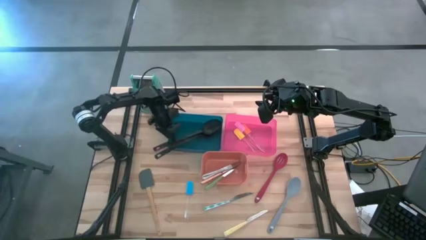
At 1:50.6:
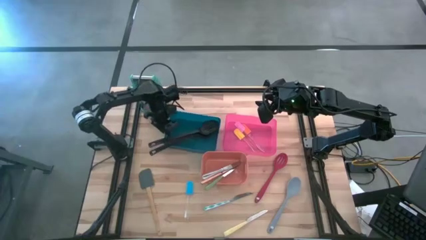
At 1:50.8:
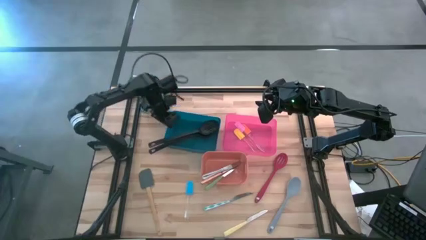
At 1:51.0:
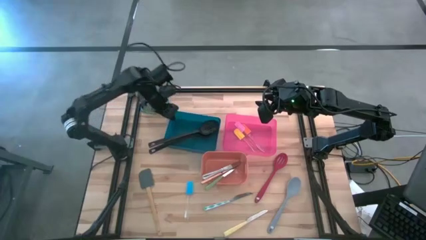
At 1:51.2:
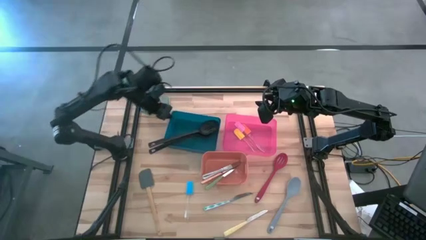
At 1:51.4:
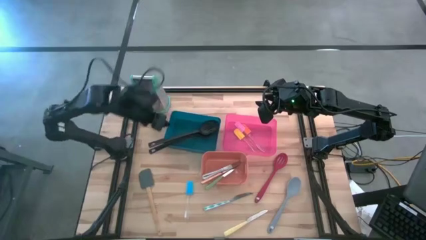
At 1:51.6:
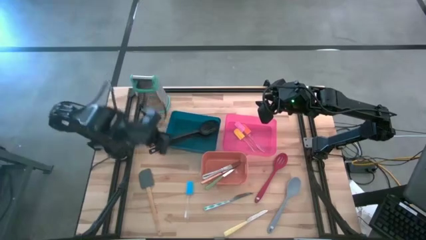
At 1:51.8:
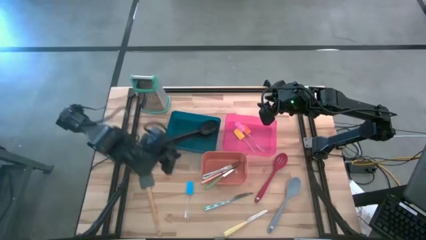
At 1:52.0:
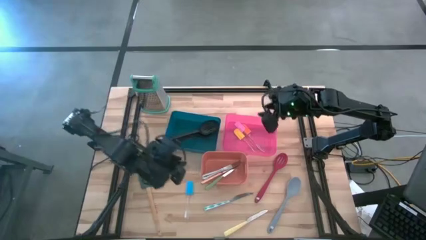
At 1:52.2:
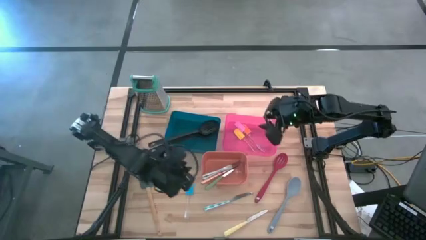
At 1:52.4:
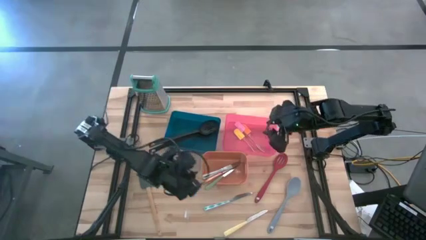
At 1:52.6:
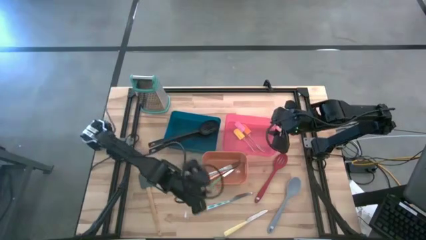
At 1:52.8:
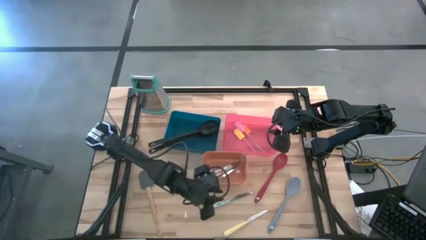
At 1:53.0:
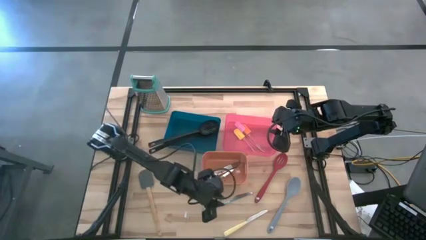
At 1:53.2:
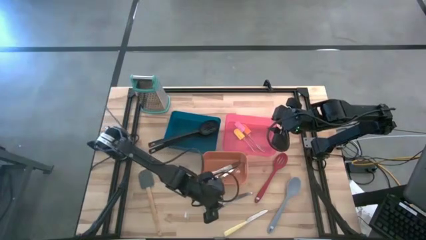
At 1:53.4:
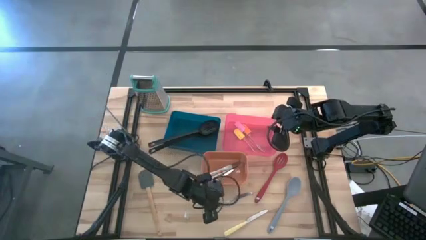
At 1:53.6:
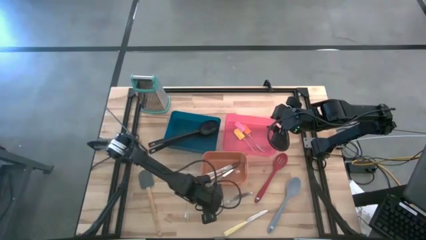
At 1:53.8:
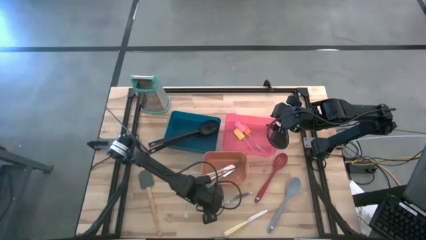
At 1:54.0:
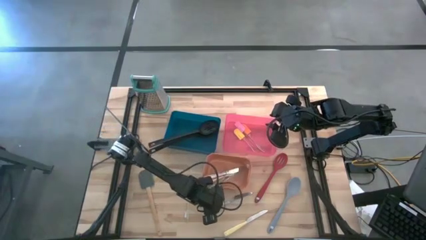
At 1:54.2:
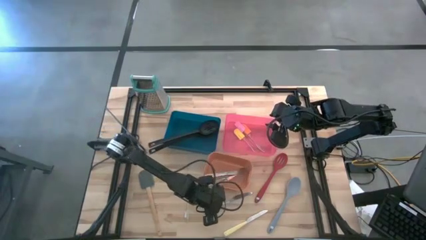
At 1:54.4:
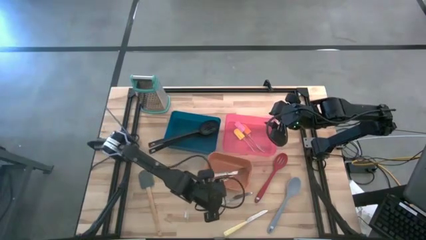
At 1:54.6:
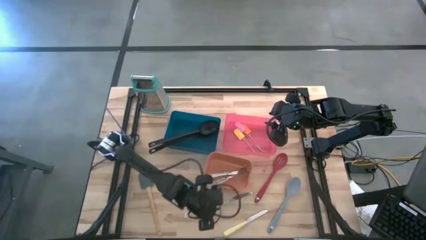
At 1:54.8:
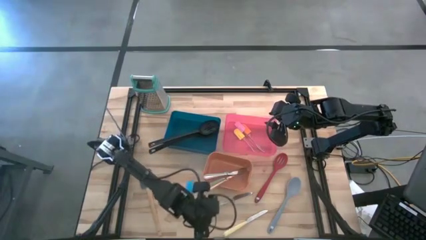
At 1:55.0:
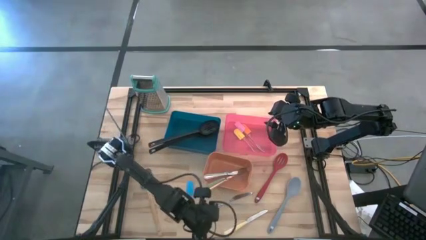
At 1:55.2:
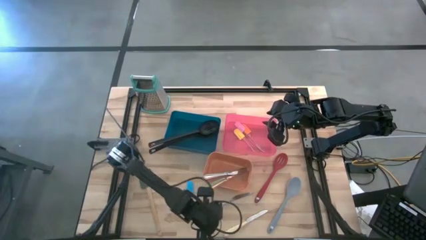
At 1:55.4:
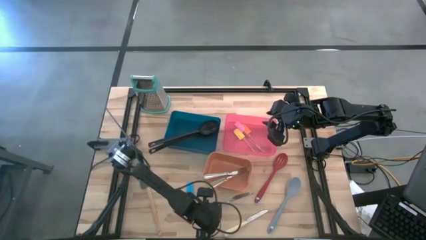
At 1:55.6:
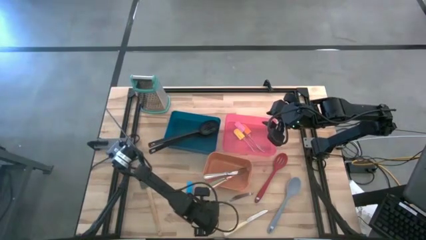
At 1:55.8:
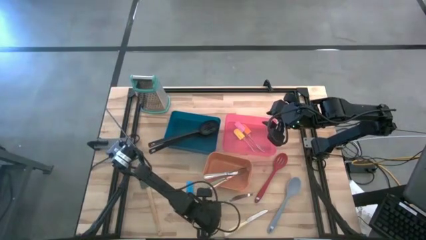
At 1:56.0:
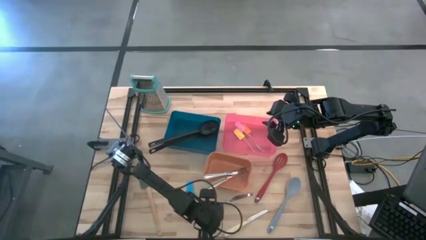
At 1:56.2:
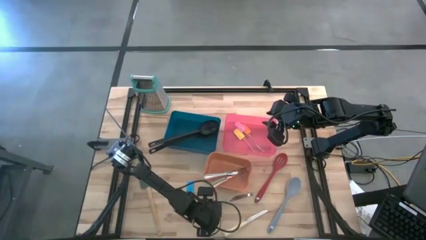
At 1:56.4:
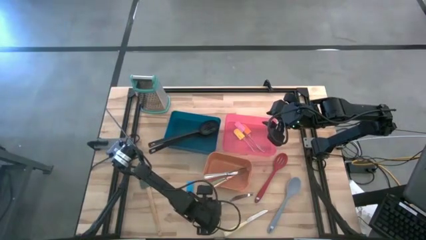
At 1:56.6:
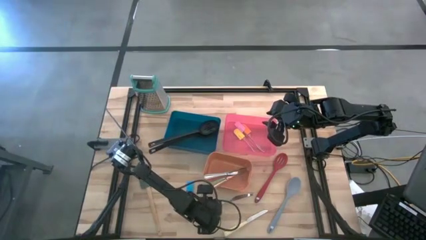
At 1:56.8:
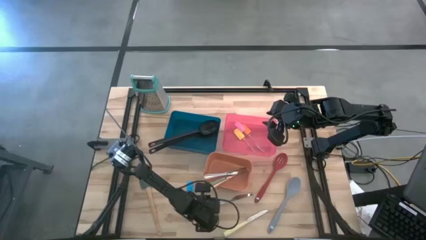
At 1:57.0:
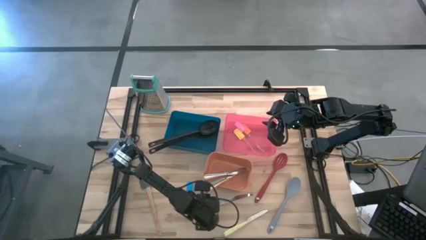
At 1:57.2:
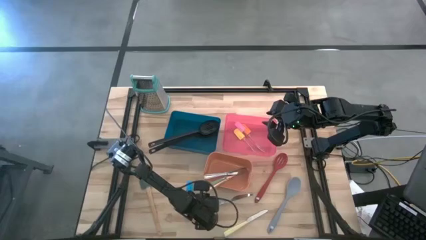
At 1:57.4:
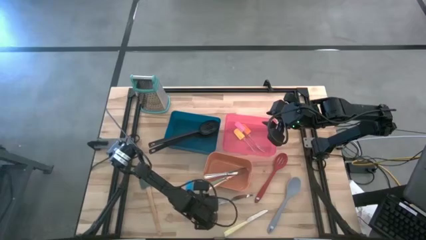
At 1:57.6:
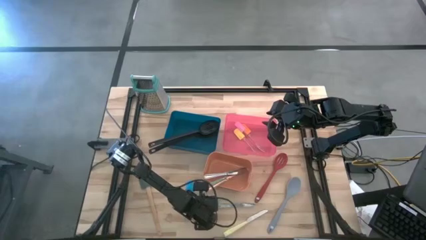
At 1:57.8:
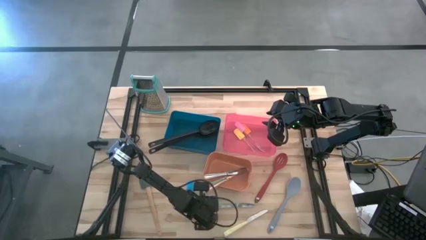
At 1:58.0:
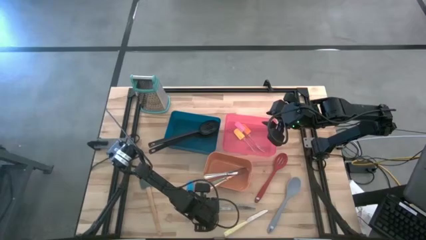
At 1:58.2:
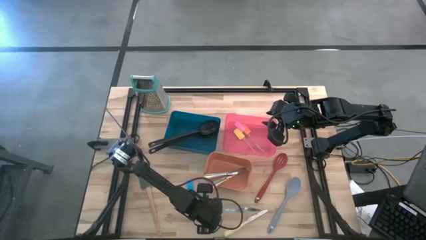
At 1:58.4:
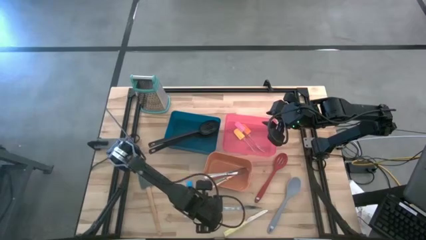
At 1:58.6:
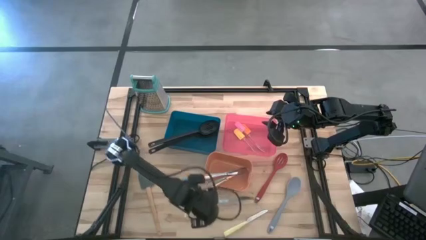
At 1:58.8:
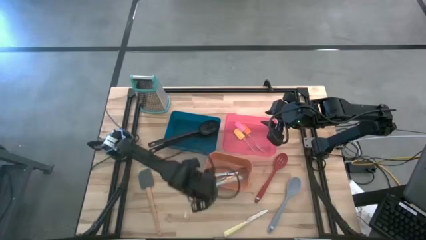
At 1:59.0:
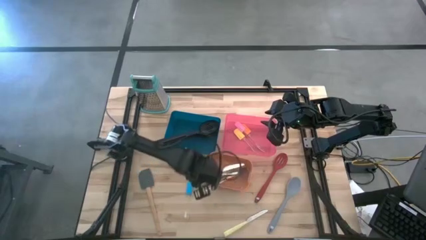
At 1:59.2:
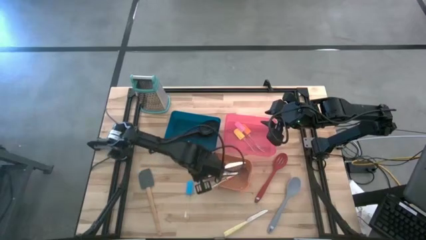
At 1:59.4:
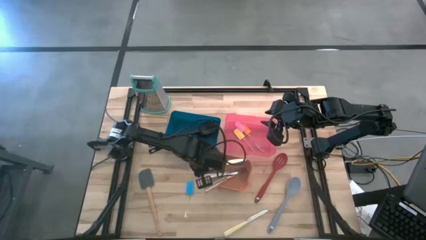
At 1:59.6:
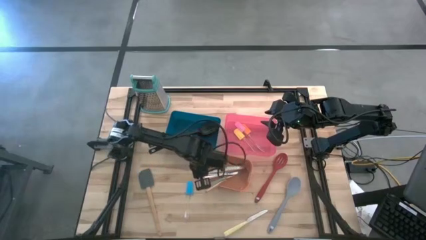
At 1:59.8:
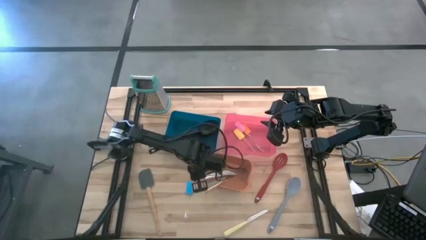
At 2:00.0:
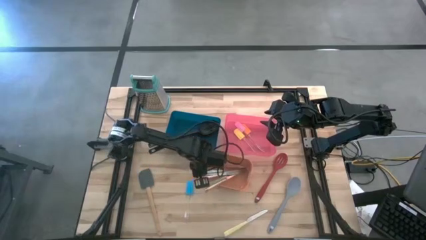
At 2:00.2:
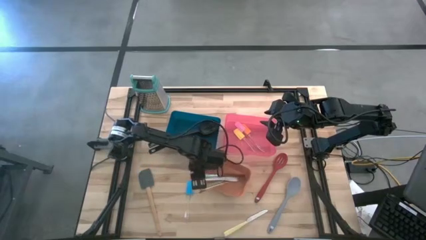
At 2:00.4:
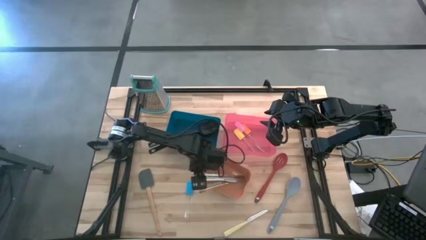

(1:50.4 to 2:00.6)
Task: Pick & Place Kitchen Items
Put the blue knife into the orange bin

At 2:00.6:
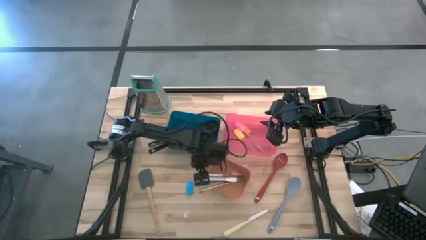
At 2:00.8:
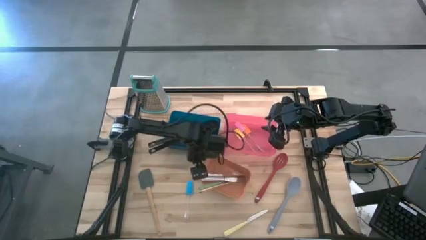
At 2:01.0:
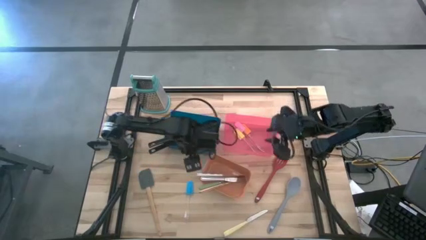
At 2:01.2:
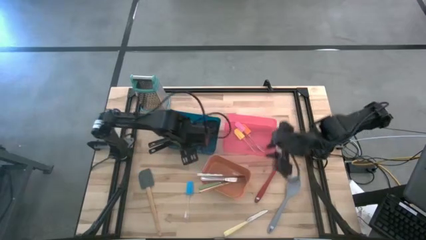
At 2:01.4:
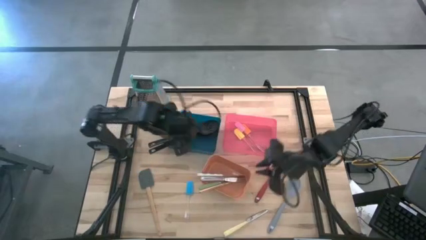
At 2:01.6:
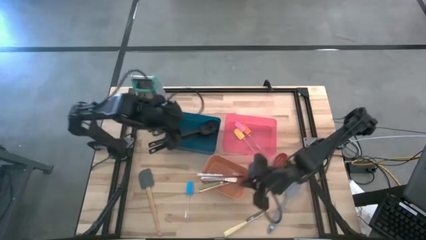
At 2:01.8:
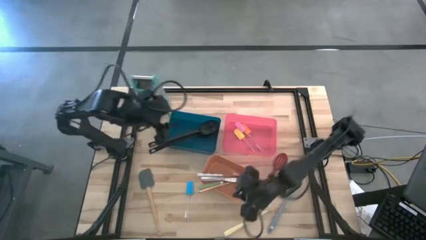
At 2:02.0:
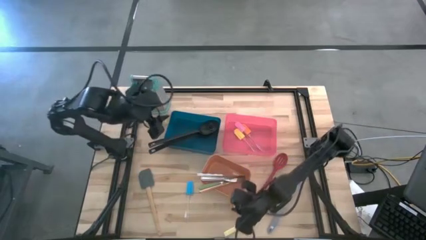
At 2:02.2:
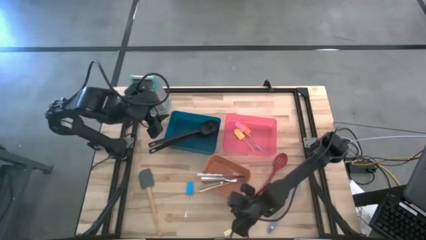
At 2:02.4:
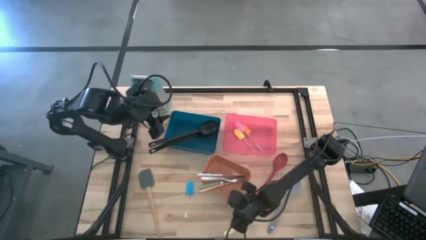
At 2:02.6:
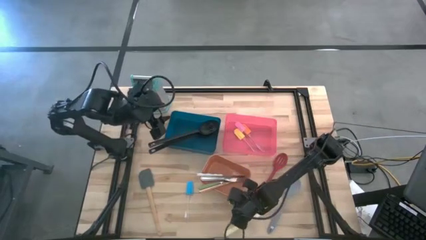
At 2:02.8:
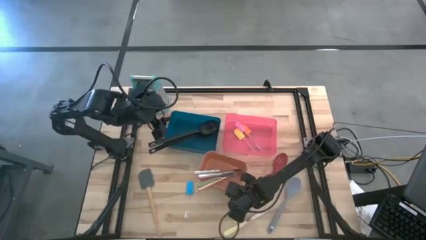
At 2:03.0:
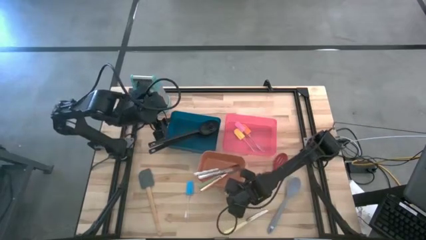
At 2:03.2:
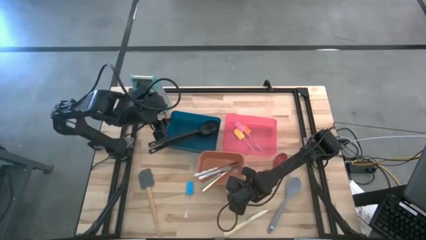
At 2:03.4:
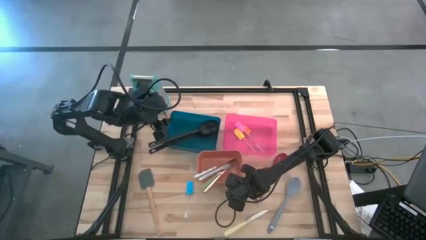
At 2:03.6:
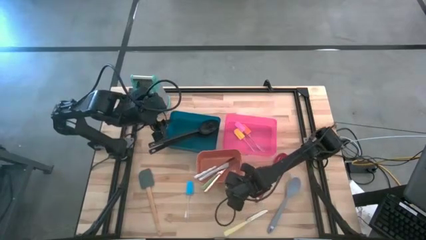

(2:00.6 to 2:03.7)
Adjust the orange bin

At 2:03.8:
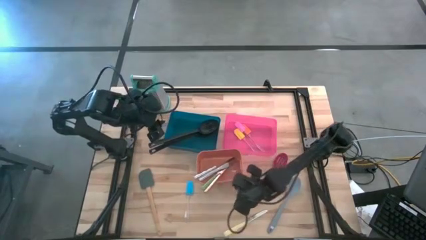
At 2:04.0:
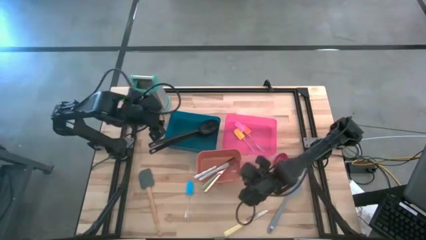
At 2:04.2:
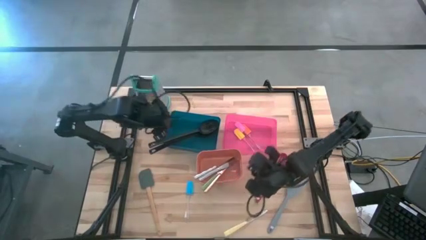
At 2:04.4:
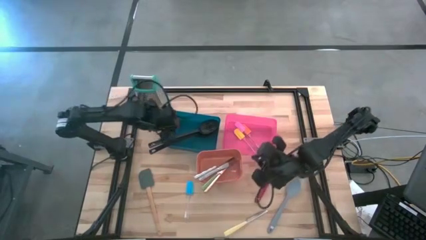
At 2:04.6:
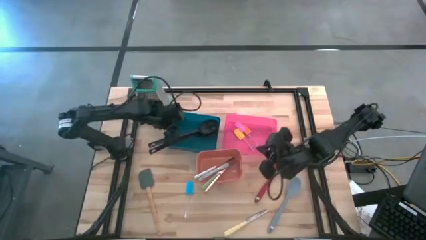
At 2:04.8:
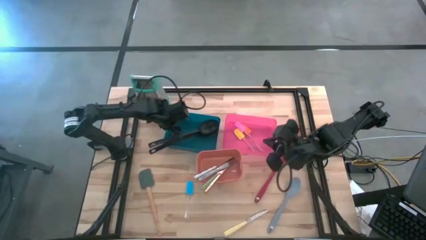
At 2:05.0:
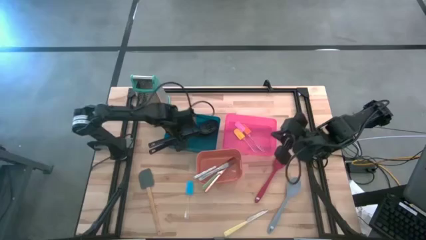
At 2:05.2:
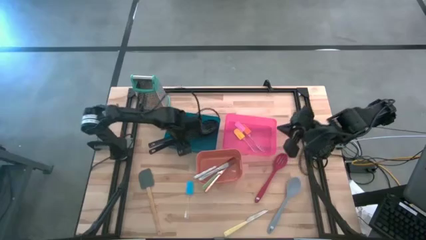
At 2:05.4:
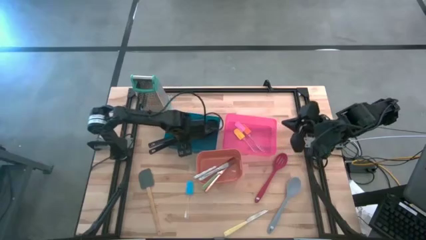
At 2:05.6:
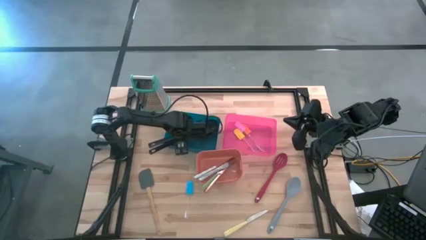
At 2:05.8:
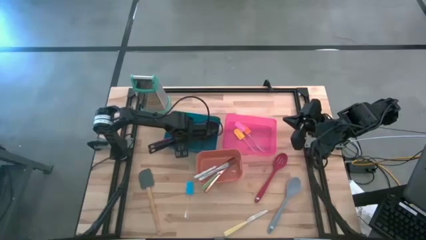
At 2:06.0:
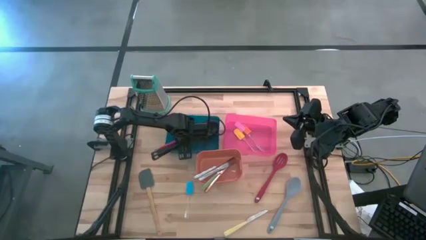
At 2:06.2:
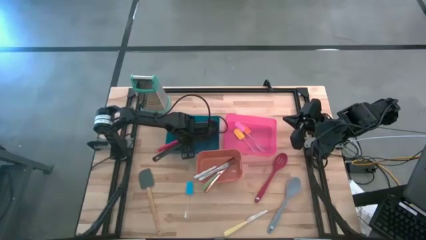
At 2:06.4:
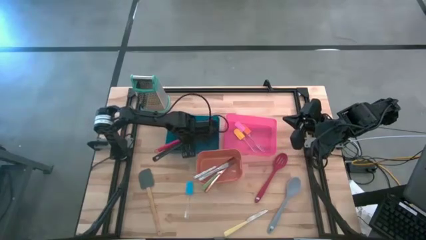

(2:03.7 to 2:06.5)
Adjust the black serving spoon in the blue bin
